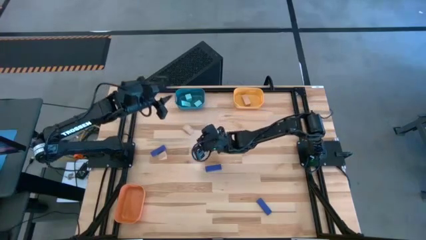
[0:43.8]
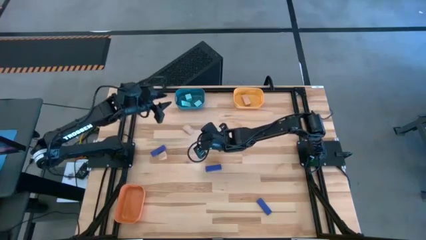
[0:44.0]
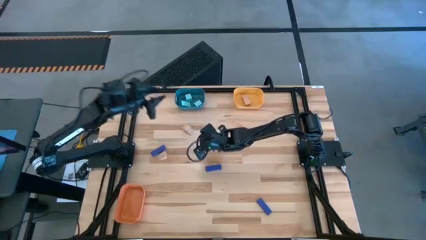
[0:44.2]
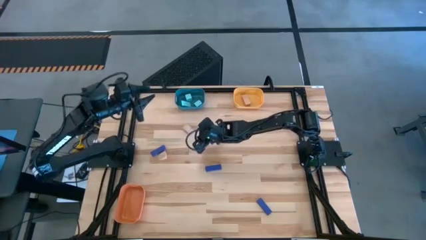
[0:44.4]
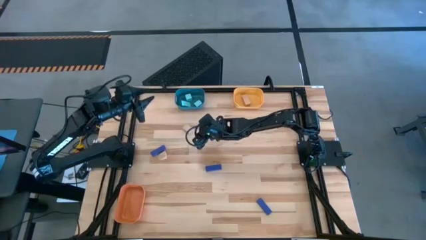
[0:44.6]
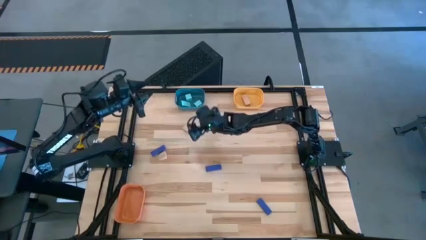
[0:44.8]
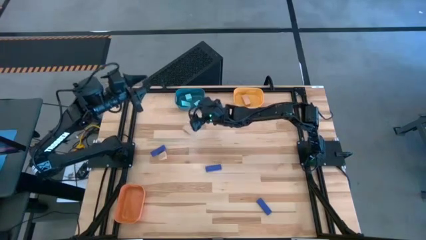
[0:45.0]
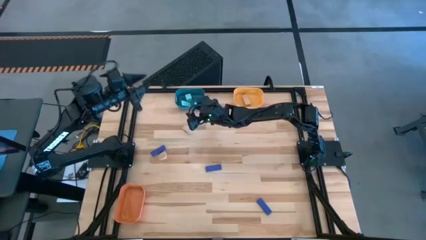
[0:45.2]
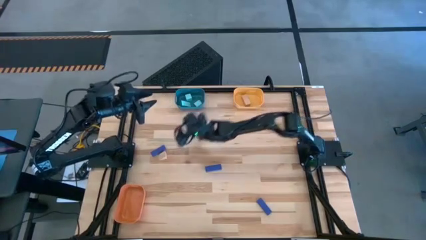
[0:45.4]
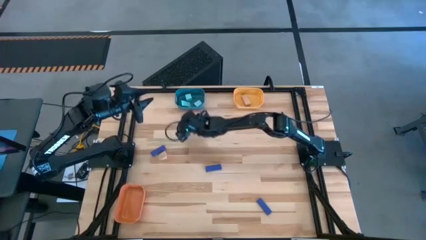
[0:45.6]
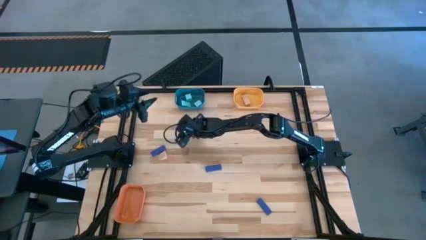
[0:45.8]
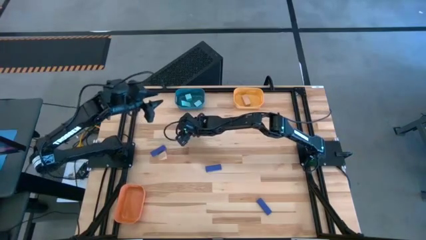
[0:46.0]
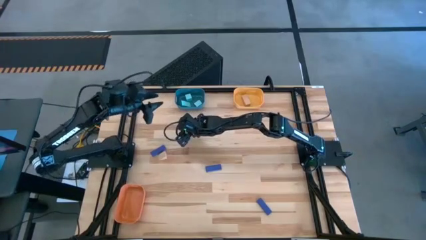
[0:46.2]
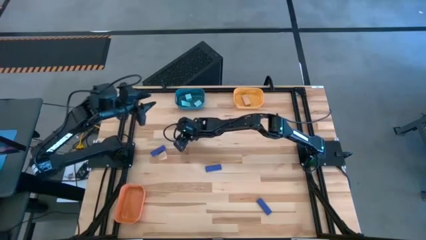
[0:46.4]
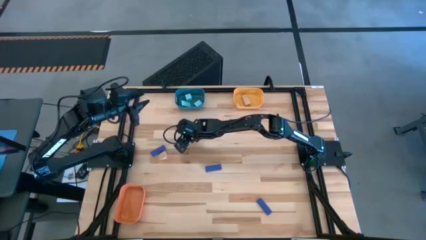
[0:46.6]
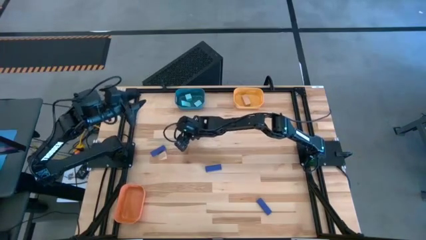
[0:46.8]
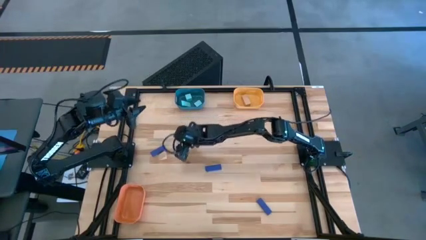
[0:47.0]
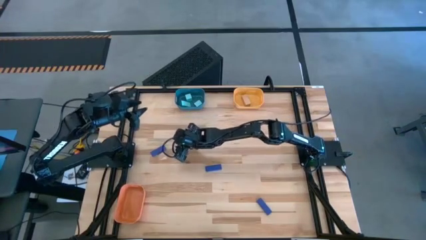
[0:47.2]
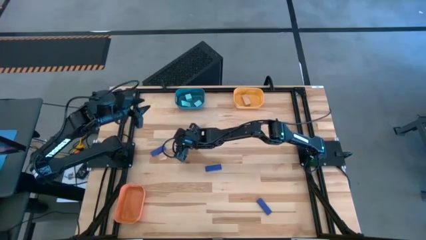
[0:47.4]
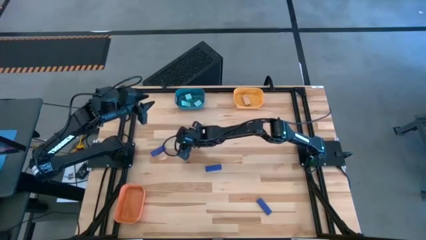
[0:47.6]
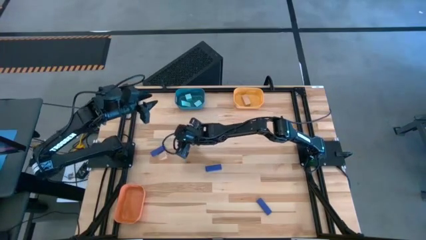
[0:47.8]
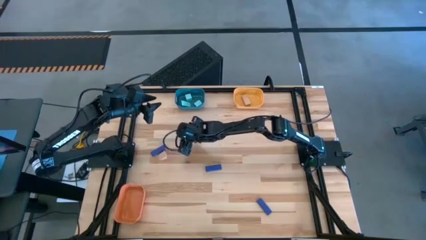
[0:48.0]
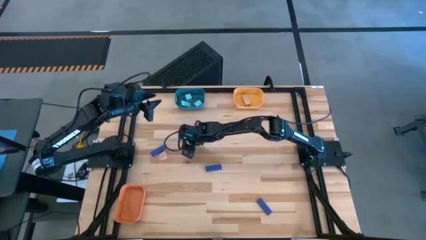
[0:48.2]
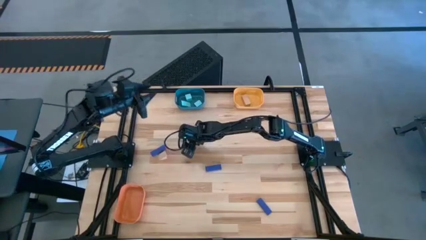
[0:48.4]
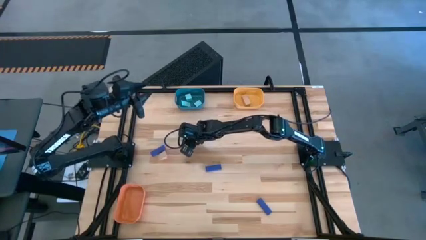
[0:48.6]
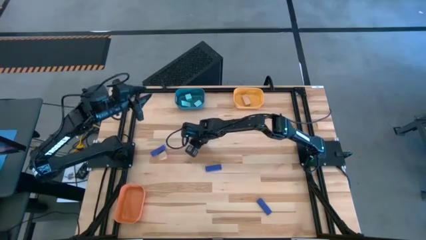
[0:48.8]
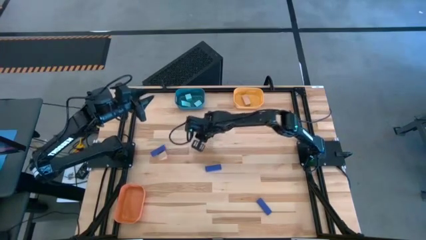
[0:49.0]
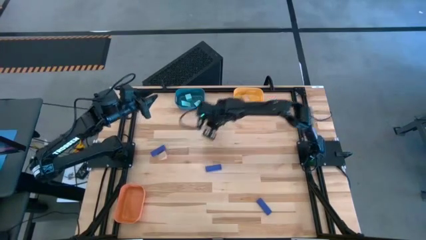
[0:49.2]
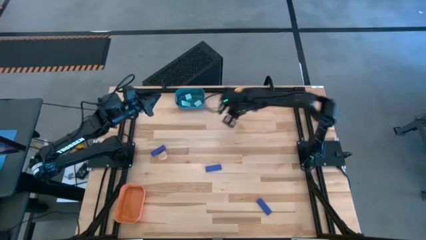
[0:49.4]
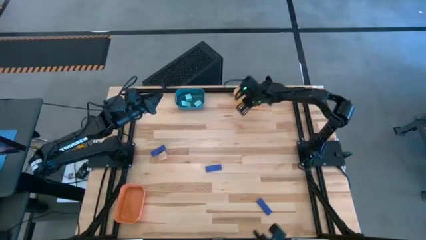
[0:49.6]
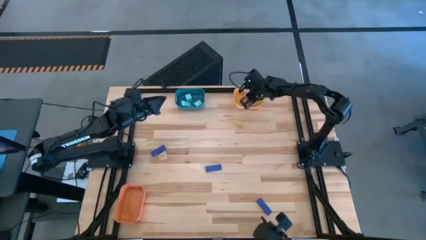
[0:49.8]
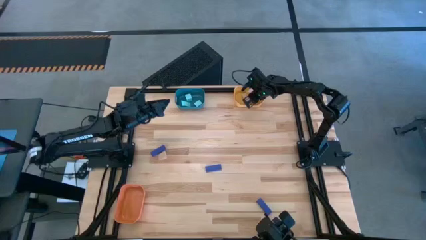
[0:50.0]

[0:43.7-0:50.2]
Task: Sort & place blocks by color
Put the top center brown block into the yellow bin

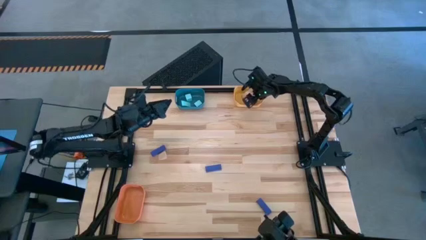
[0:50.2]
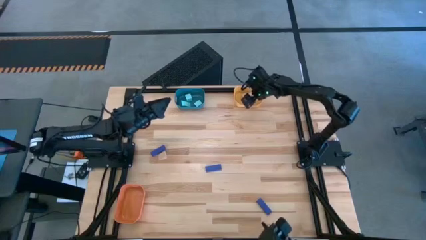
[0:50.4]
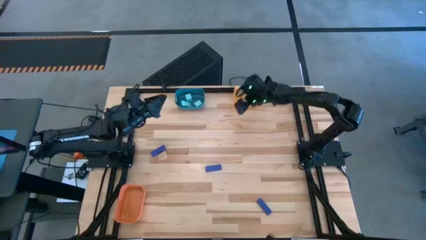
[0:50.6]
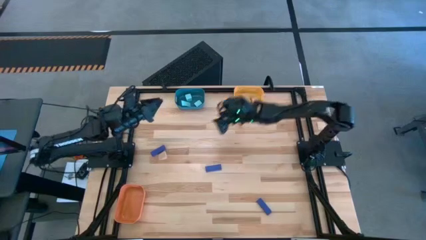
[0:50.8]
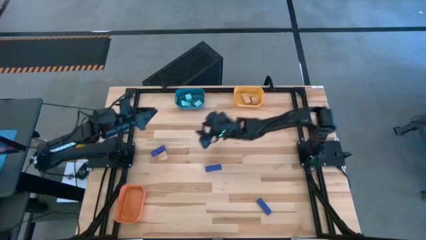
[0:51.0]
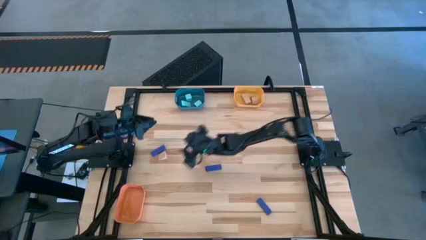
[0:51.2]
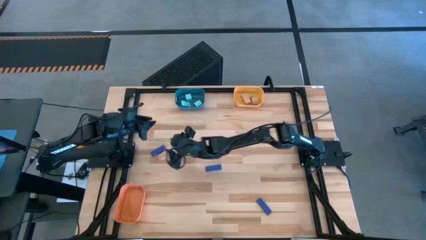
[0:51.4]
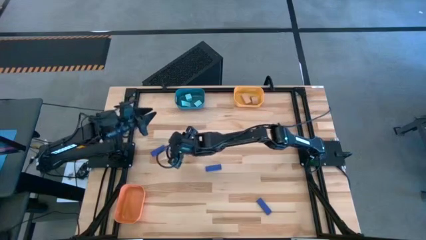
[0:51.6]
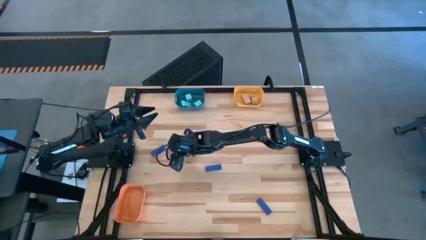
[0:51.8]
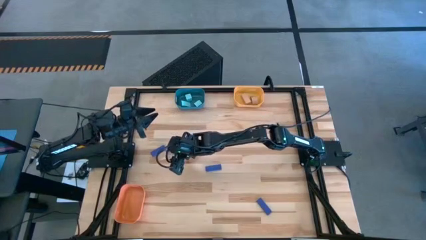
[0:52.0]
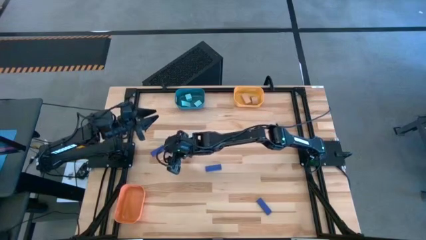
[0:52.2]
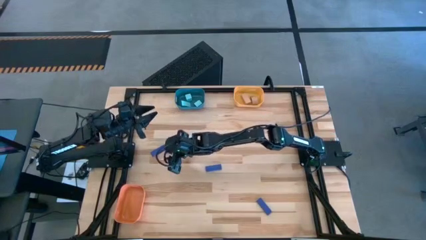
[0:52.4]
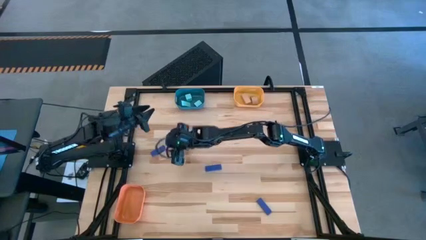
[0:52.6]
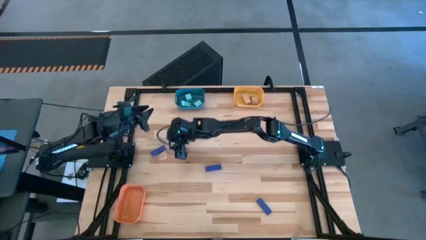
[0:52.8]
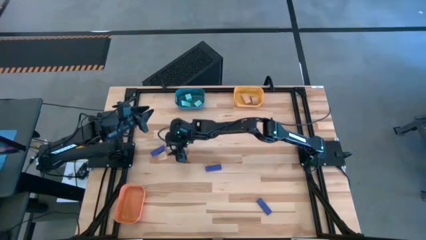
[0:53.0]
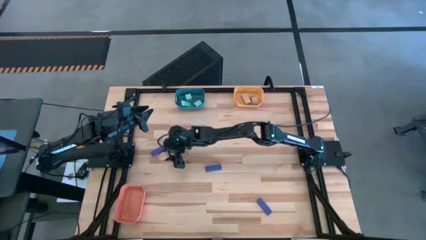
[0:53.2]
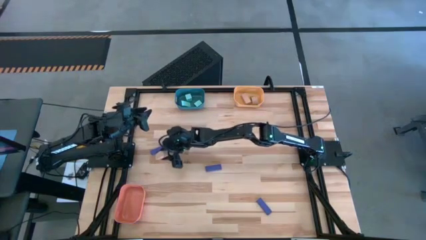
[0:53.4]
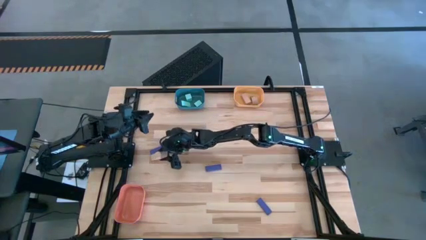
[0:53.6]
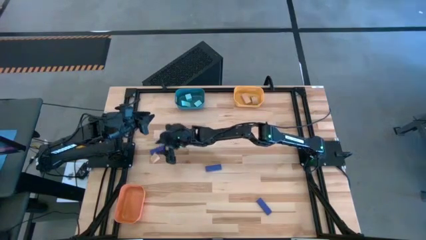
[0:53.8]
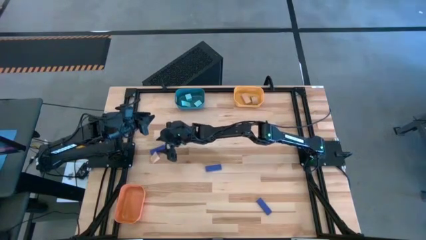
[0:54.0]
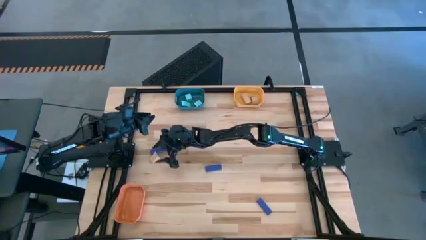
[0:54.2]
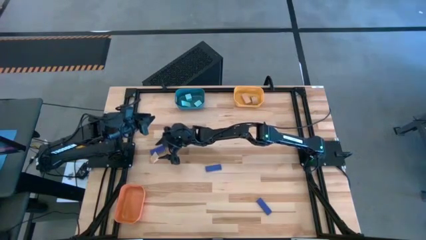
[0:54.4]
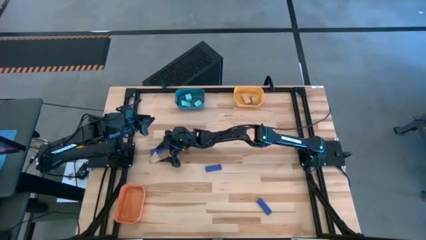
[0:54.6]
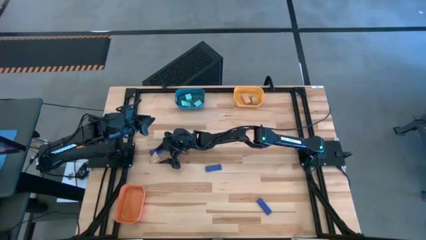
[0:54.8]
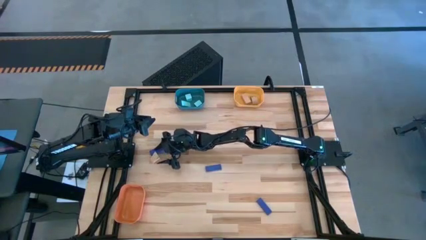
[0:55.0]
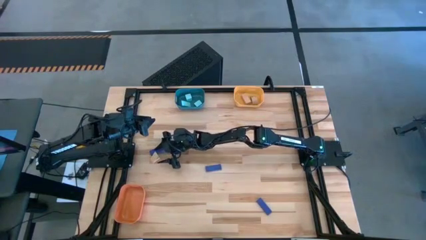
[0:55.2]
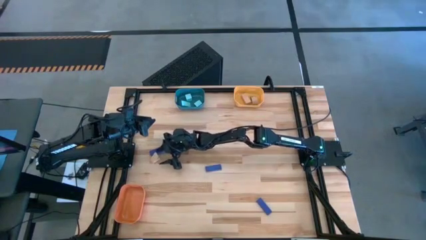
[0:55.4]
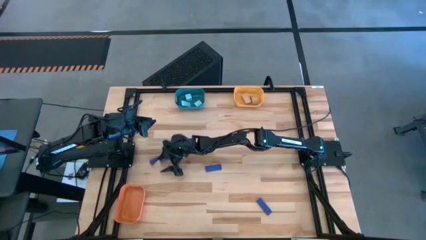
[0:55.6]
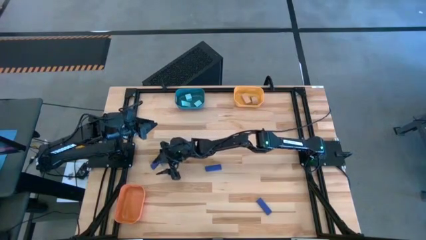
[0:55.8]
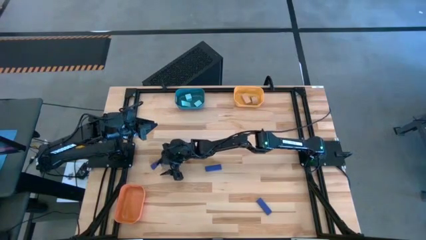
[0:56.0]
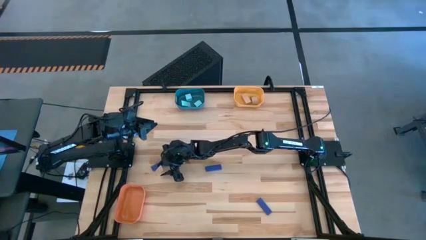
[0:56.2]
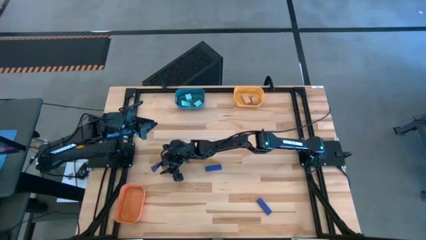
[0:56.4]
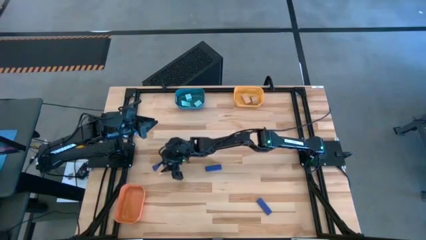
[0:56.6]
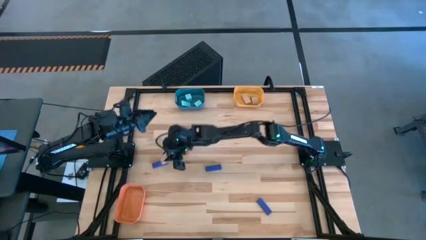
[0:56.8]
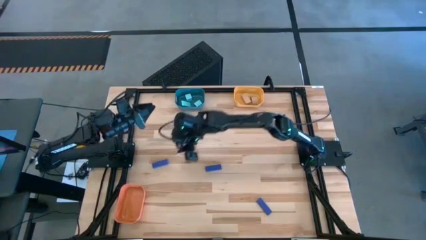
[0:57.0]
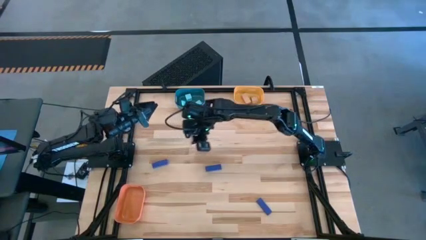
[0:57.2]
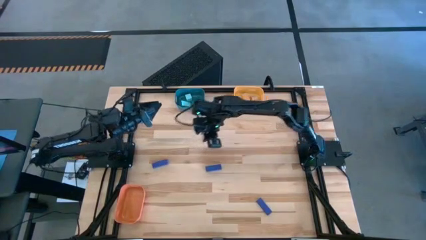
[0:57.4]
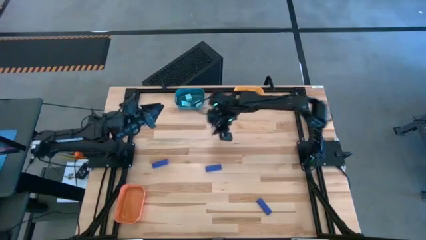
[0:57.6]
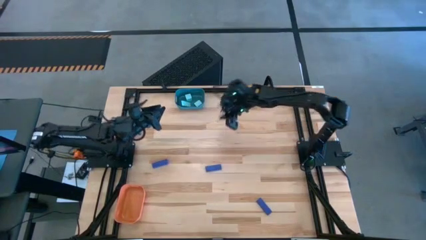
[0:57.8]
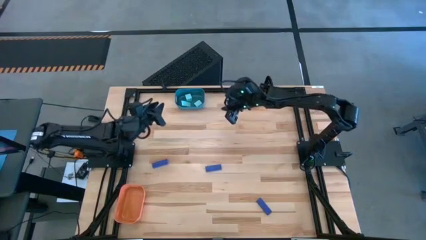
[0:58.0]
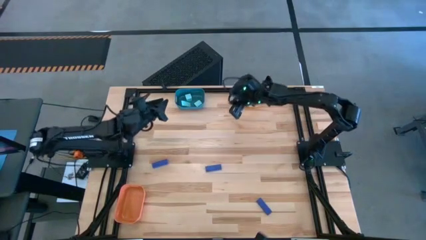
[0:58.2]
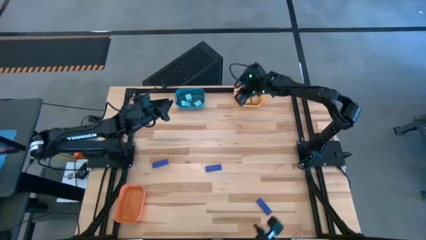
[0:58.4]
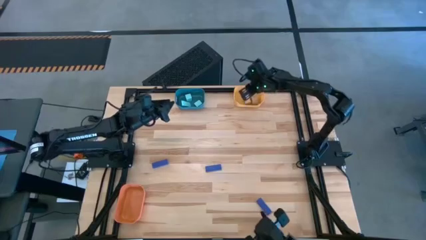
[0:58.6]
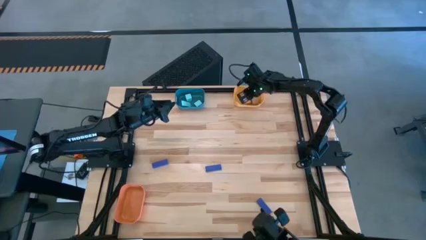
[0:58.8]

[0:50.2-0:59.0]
Put the brown block into the yellow bin
